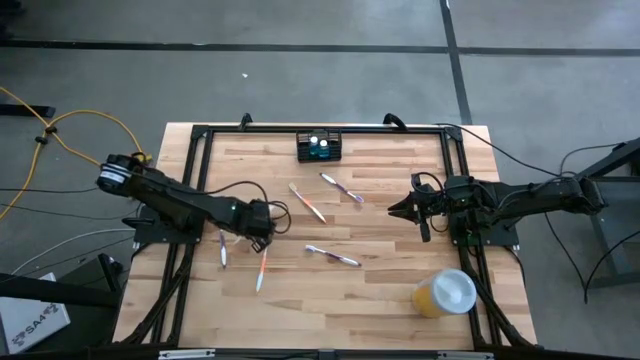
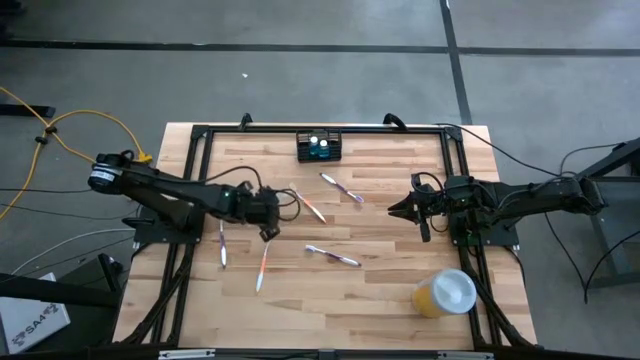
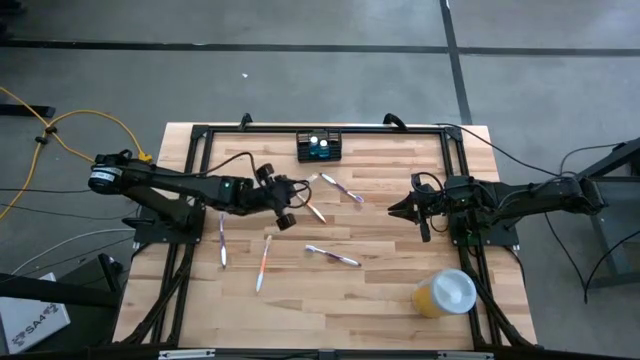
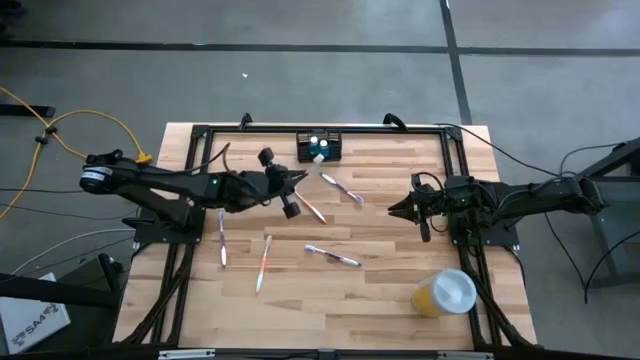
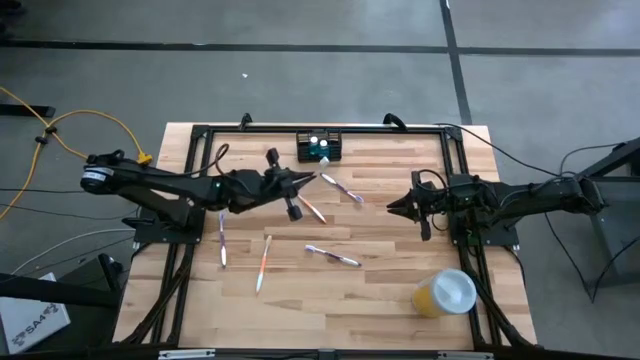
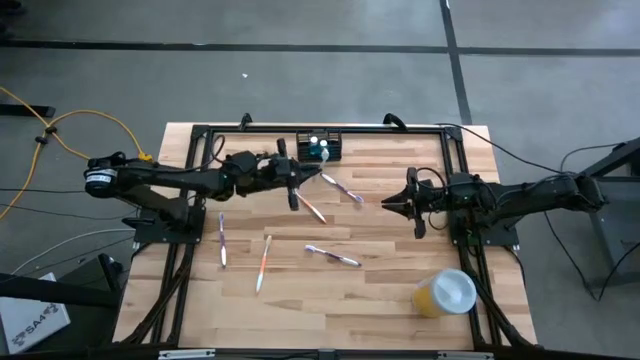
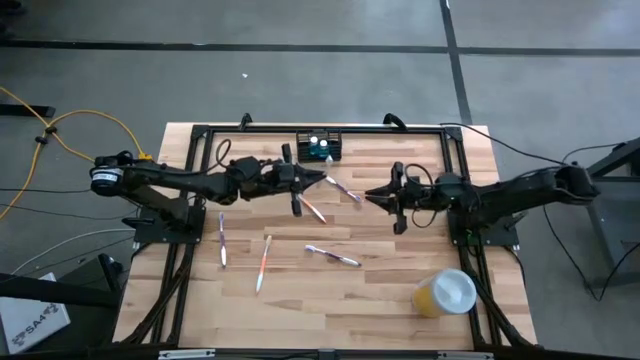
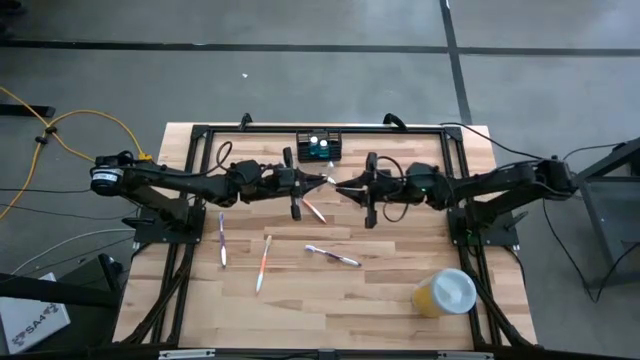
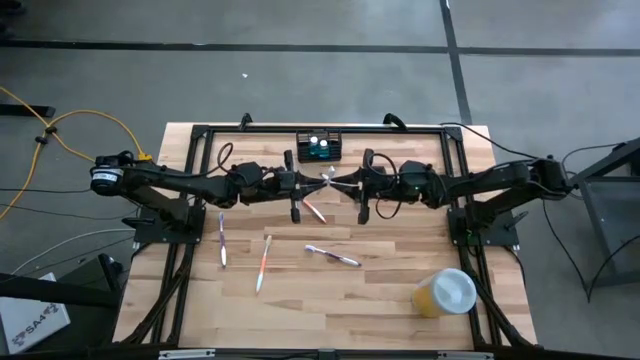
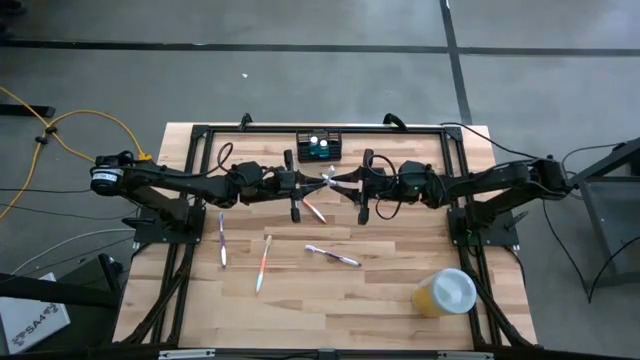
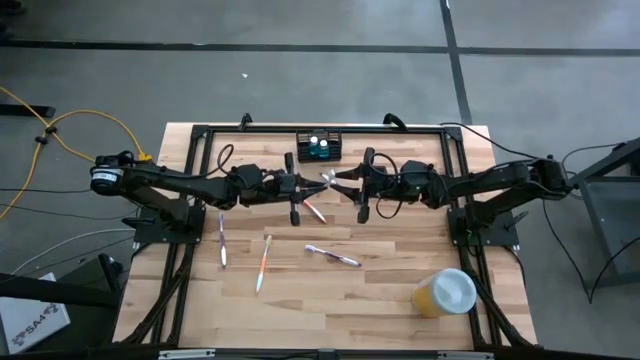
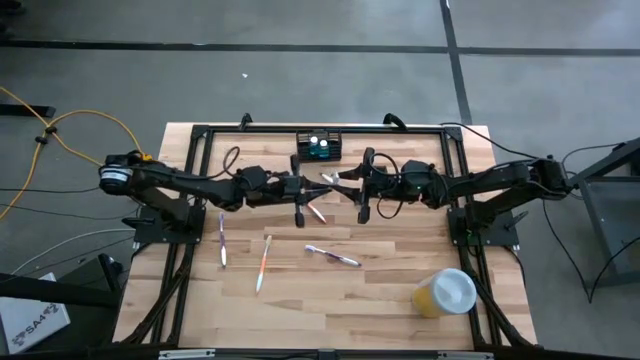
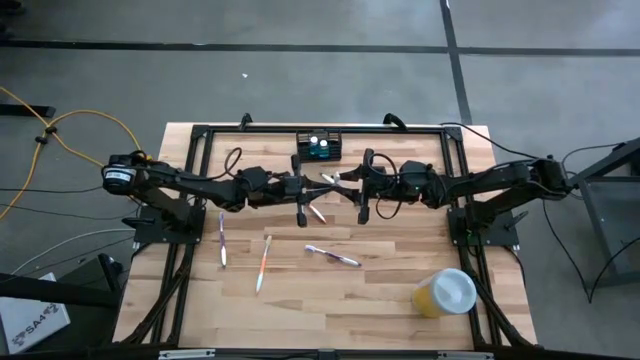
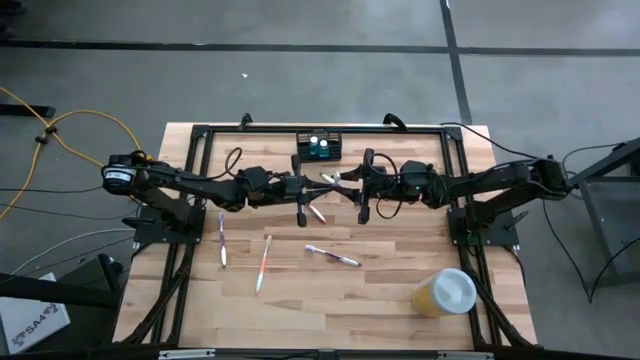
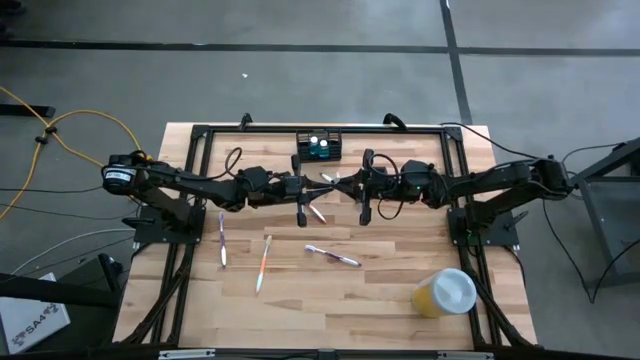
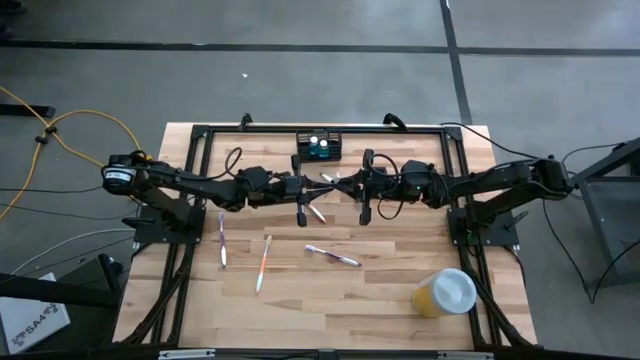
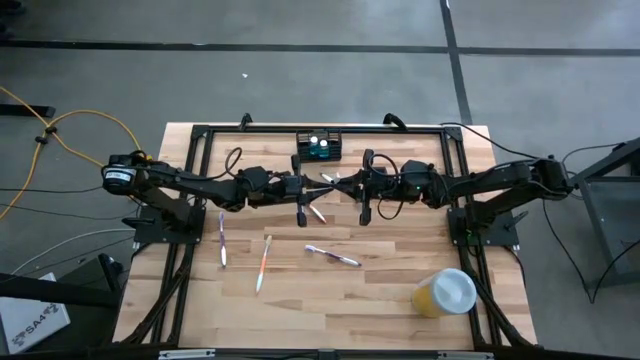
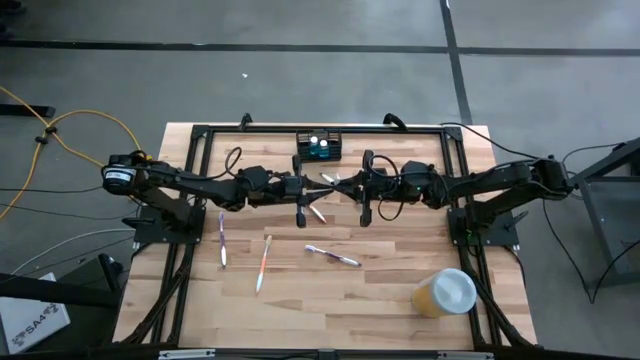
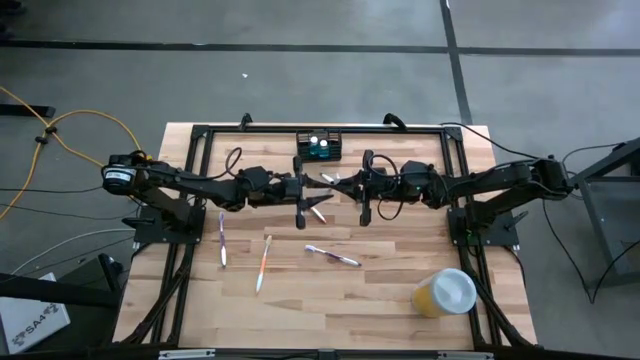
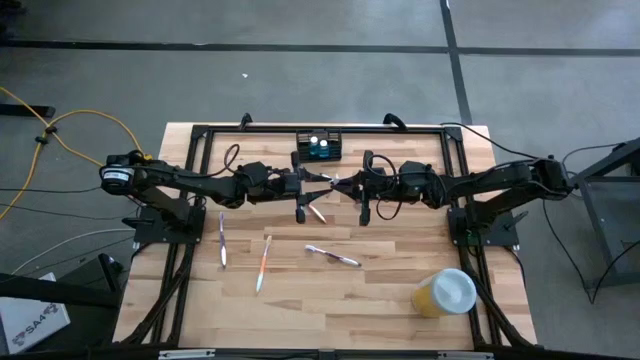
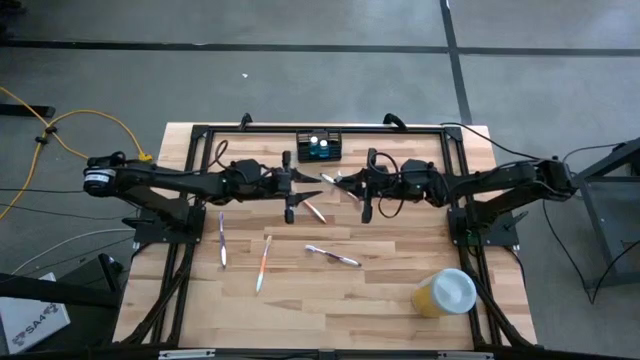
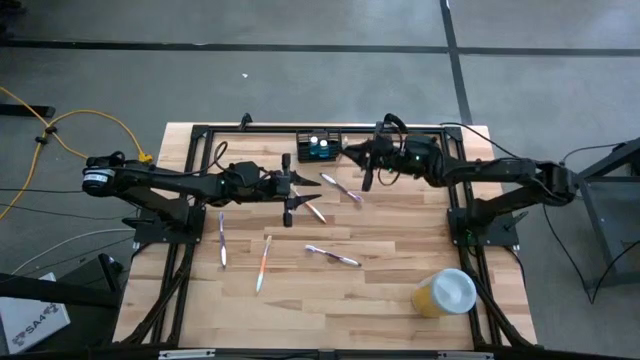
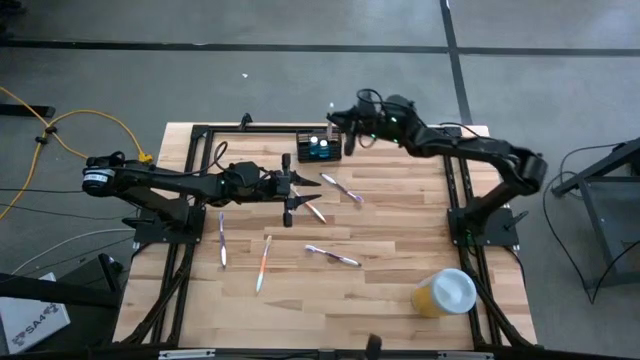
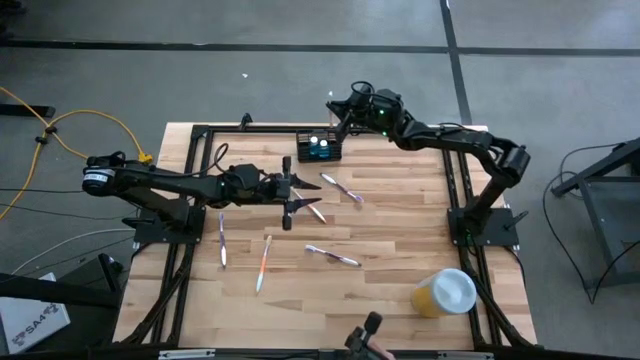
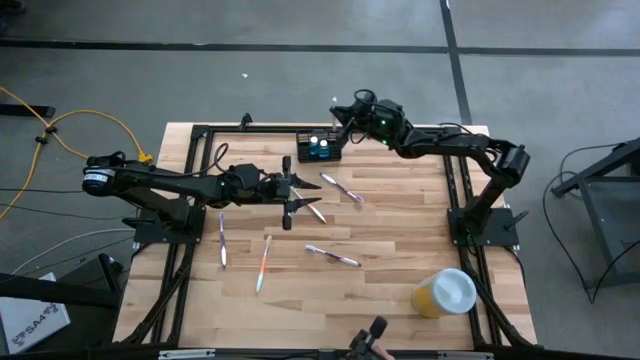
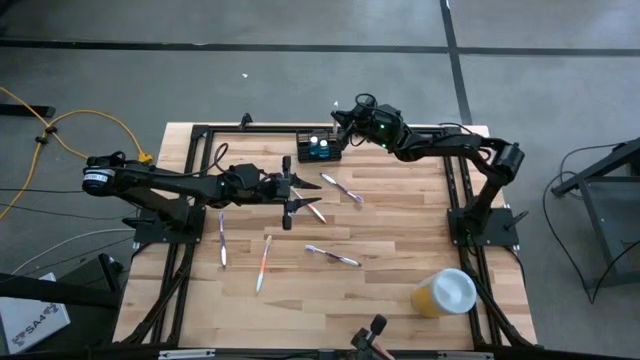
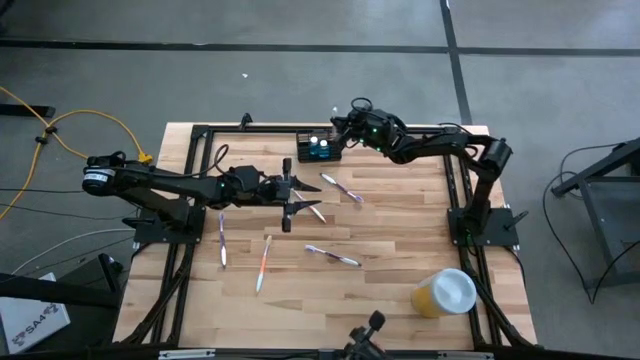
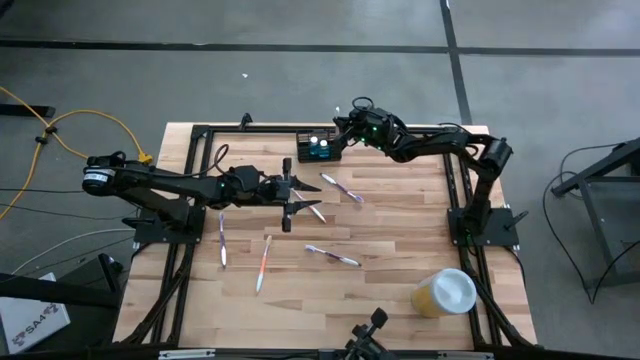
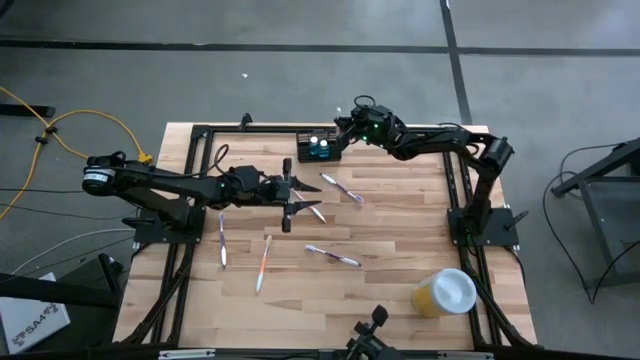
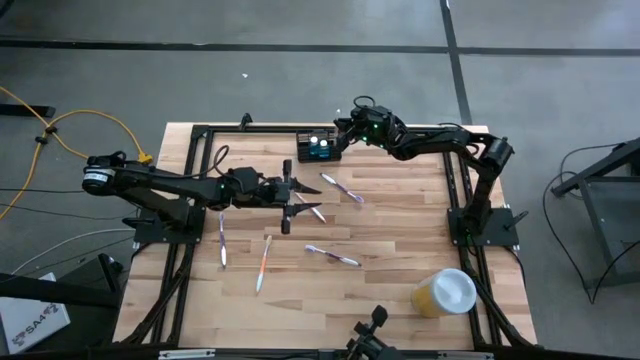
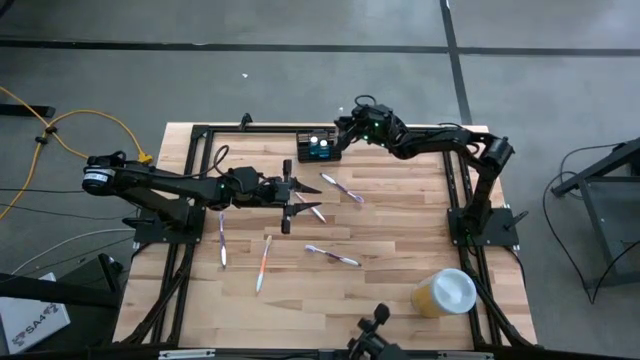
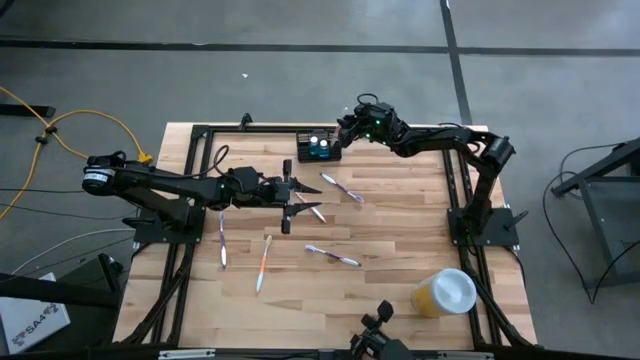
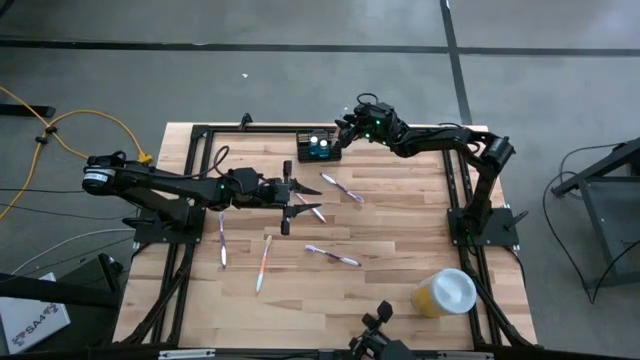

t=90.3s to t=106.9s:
Task: Pick & Place toothbrushing station
Put the left orange toothbrush into the wire organizer

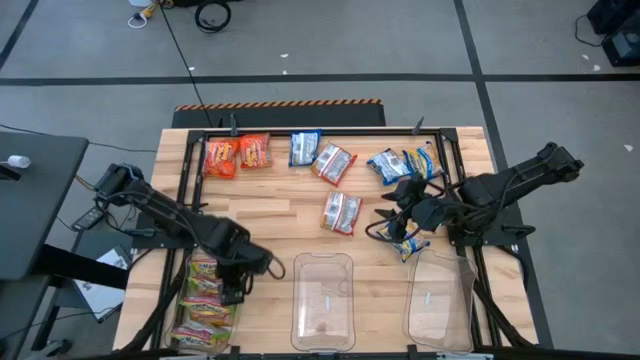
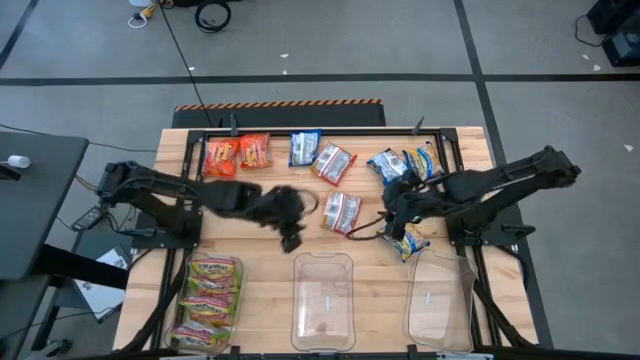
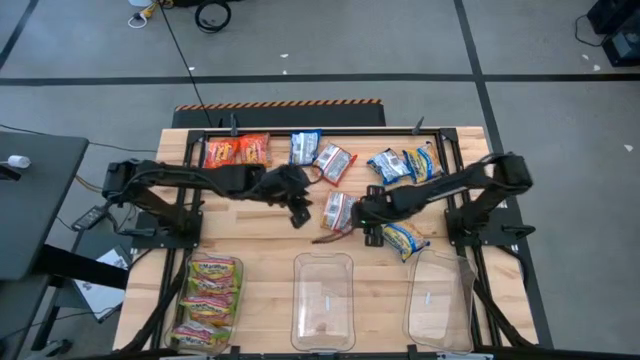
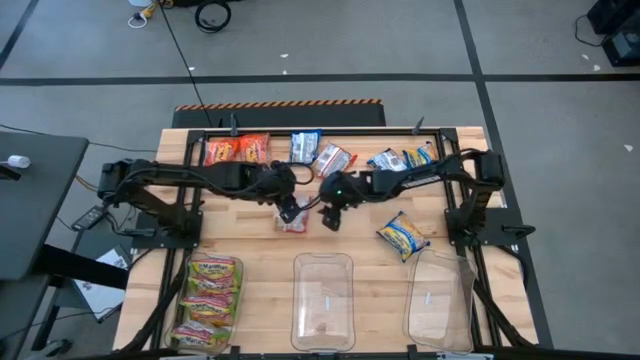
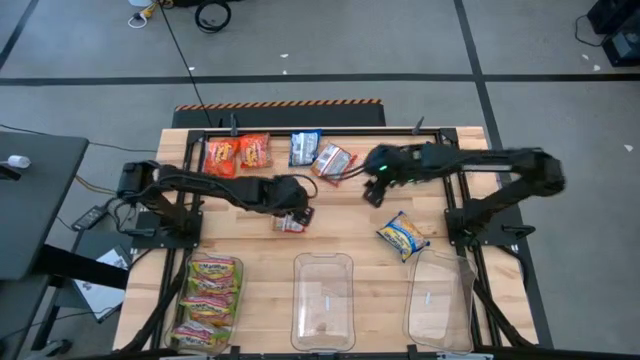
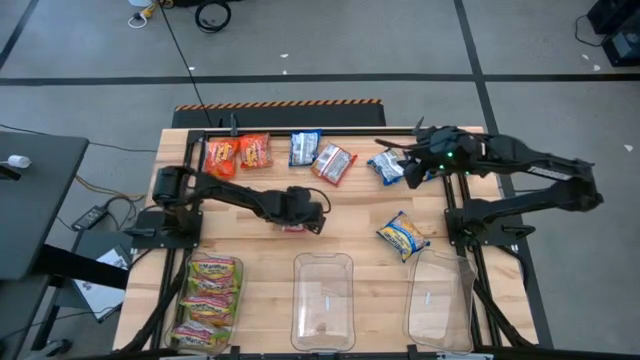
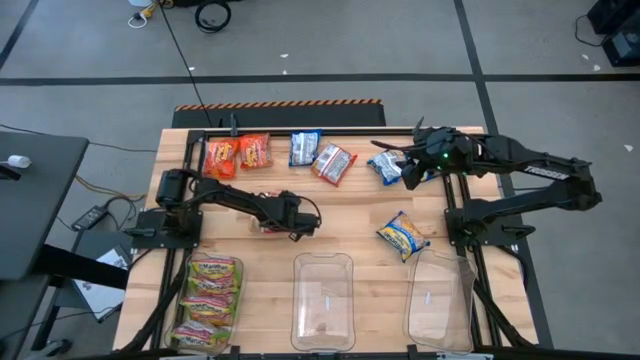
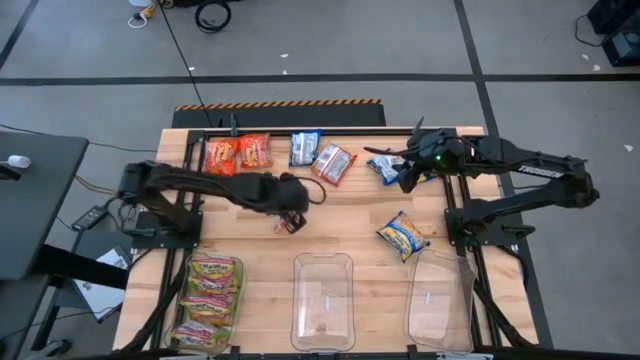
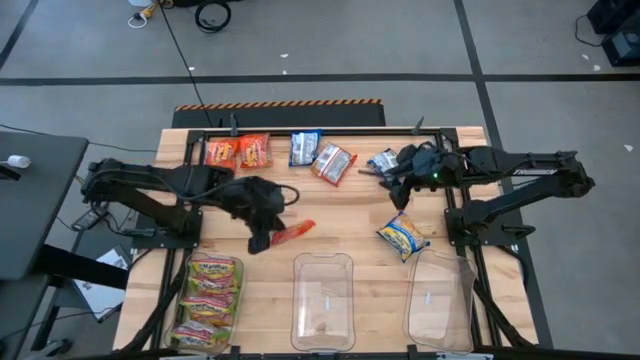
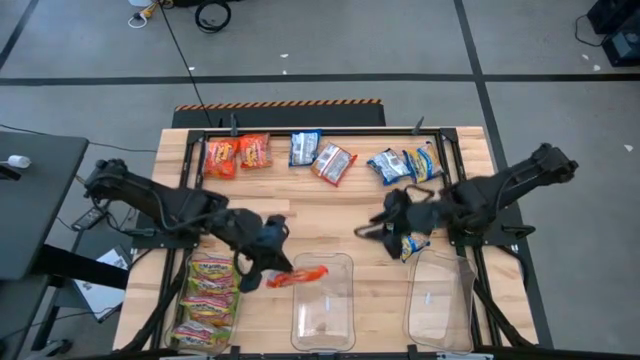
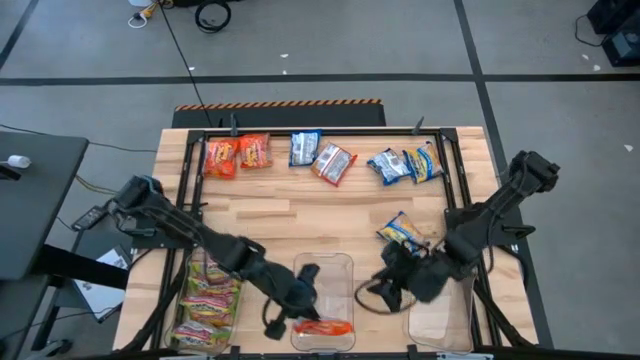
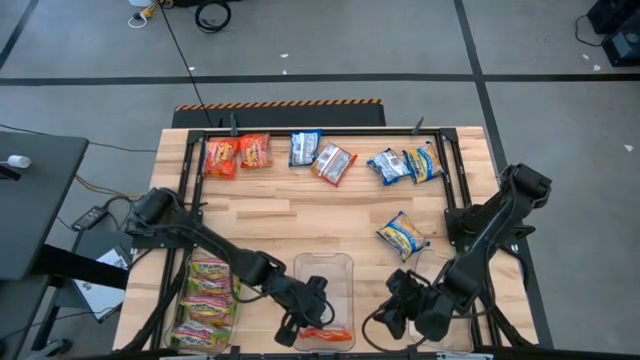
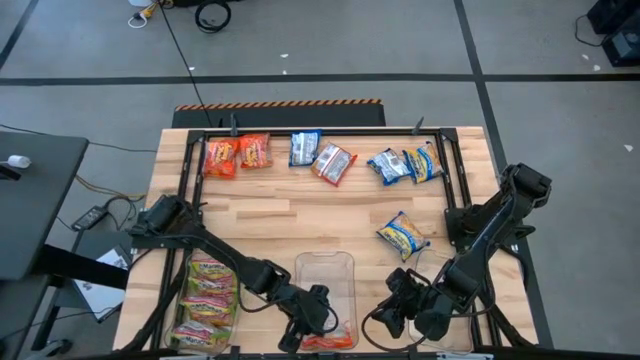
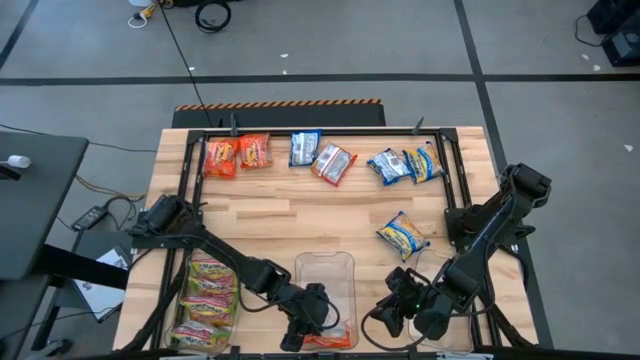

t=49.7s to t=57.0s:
Task: Sort Maruchan noodles
Put the orange noodle pack into the middle transparent bin
